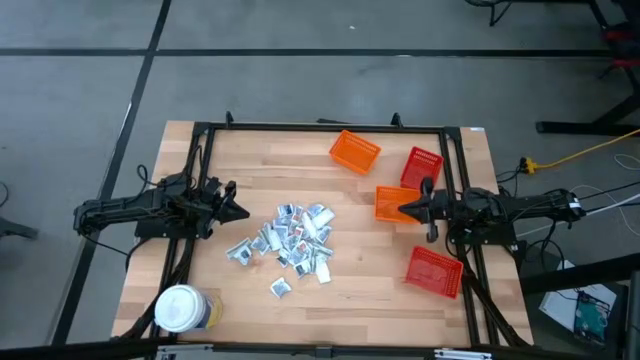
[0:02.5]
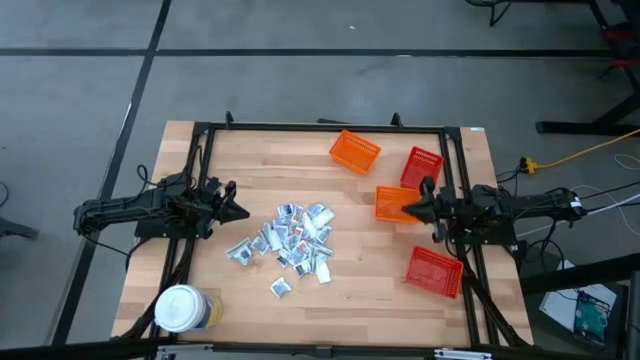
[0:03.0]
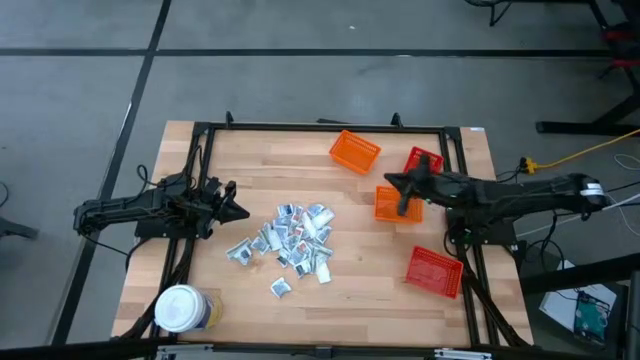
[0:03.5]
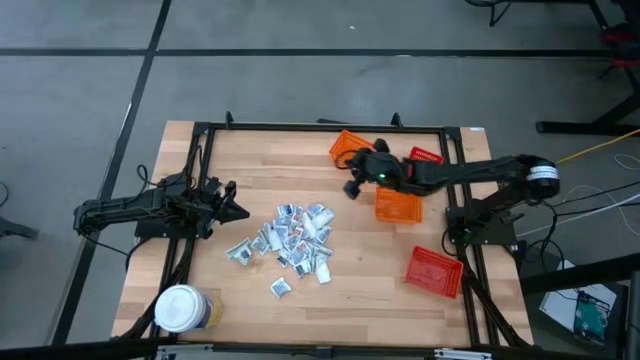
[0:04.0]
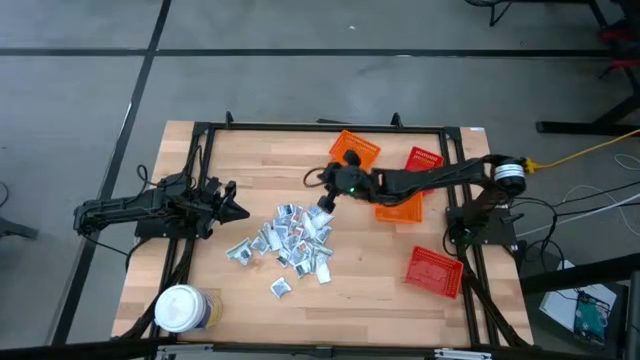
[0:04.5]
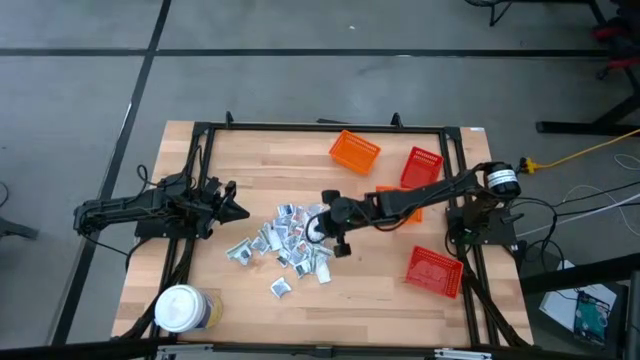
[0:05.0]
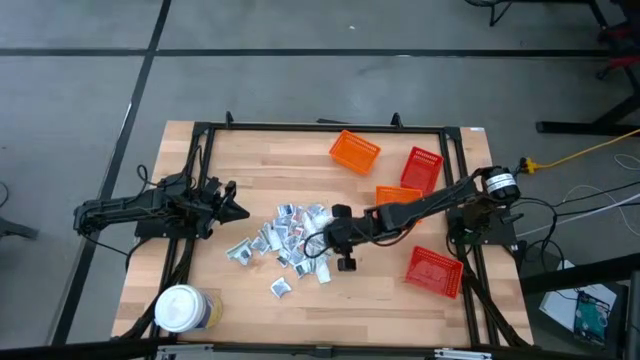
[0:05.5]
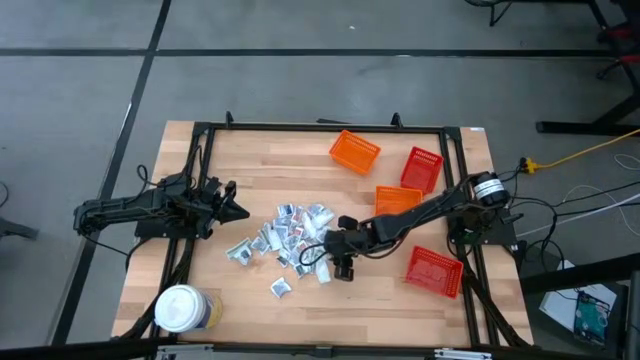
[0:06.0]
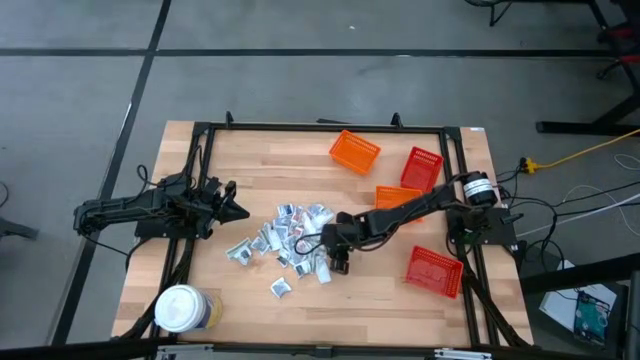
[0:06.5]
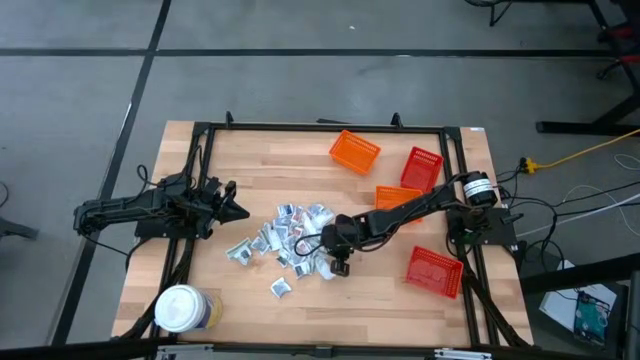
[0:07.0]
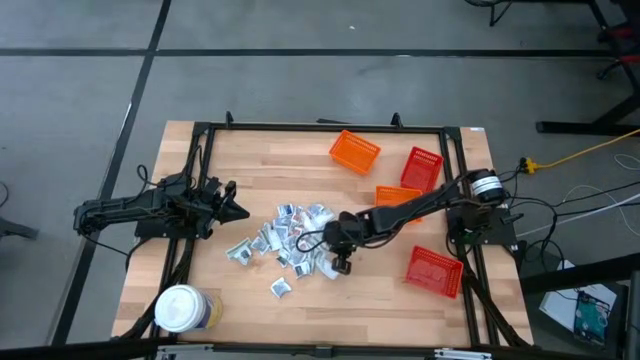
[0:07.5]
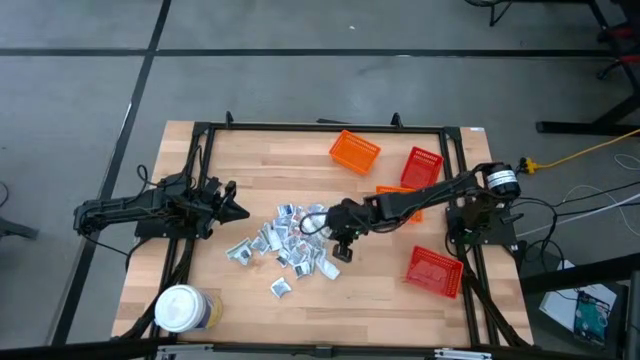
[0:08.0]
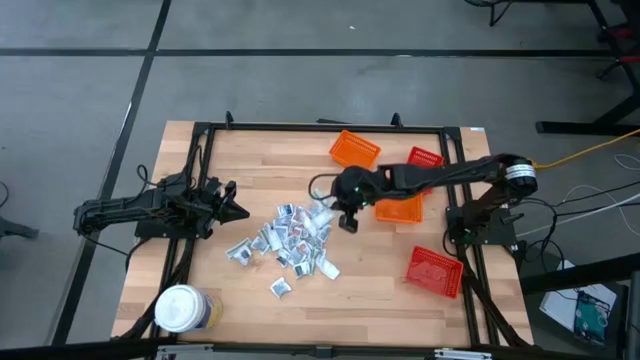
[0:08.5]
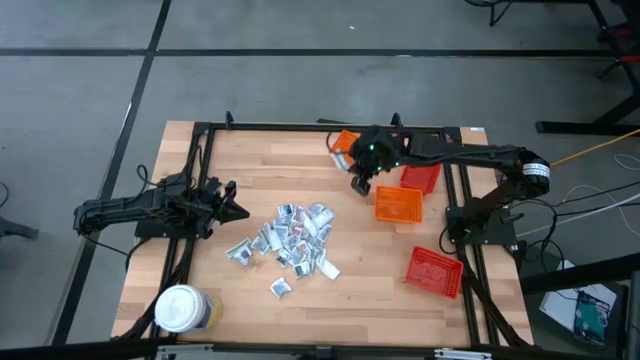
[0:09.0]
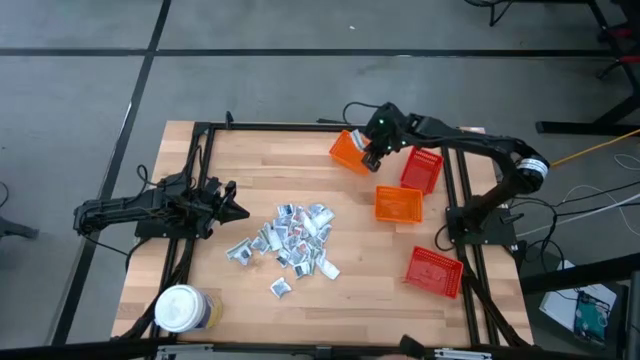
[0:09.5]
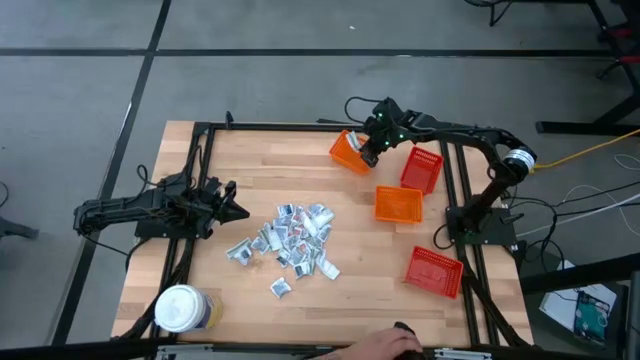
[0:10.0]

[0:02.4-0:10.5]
Task: Pick & Place First Aid Supplies
Put the green bandage pack into the top orange bin

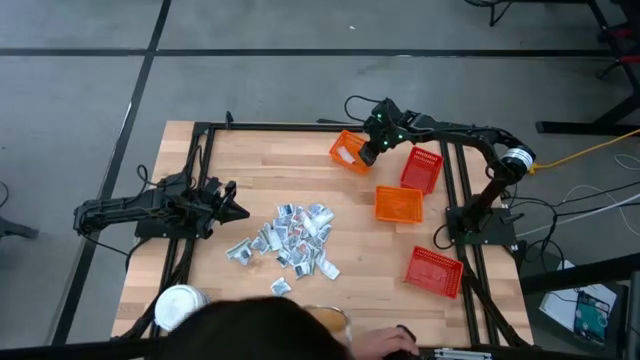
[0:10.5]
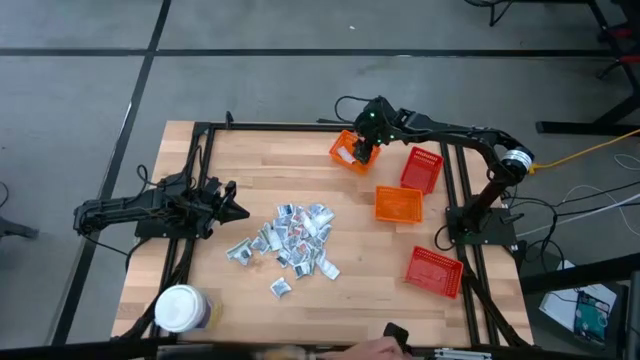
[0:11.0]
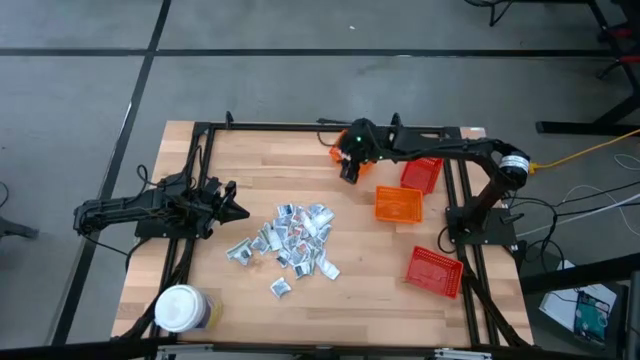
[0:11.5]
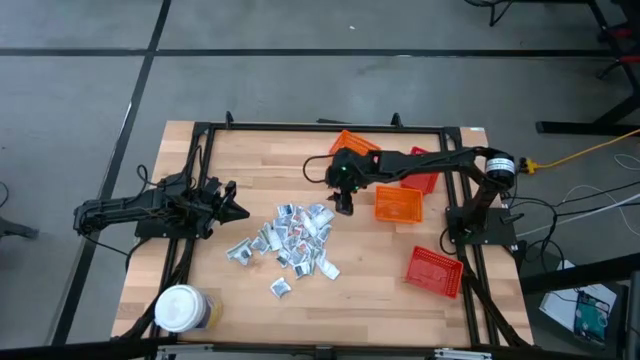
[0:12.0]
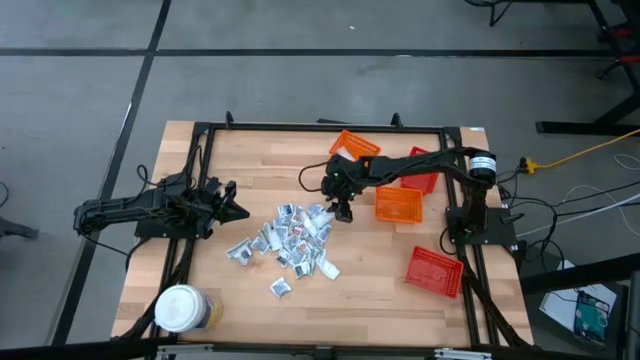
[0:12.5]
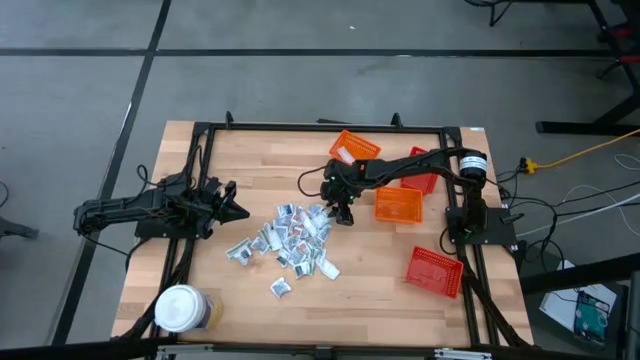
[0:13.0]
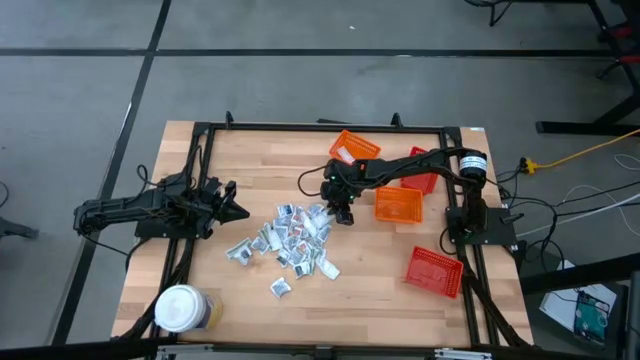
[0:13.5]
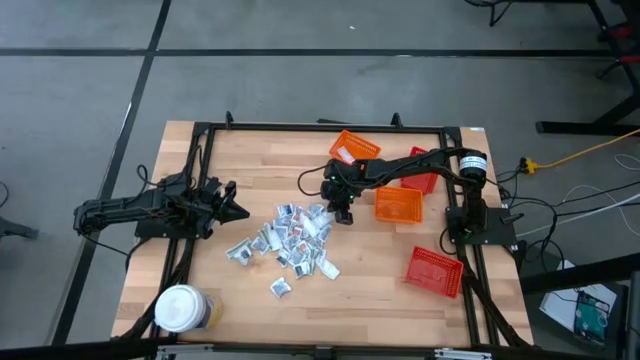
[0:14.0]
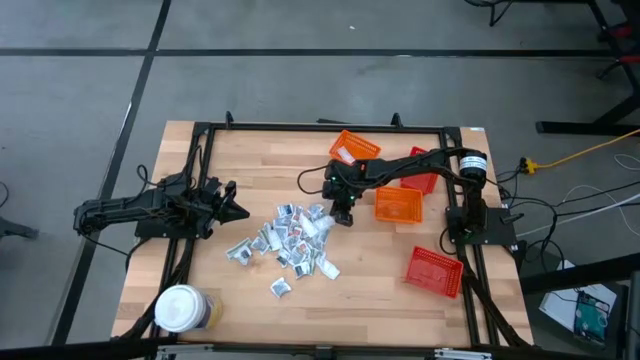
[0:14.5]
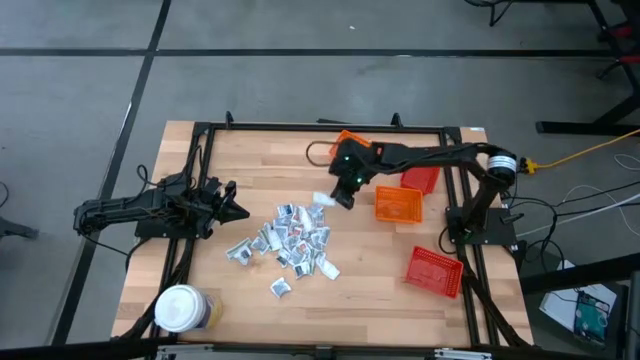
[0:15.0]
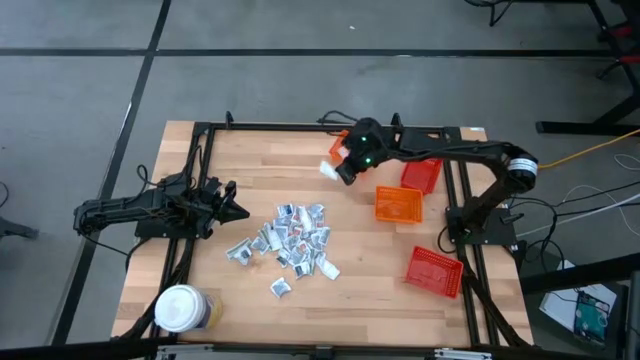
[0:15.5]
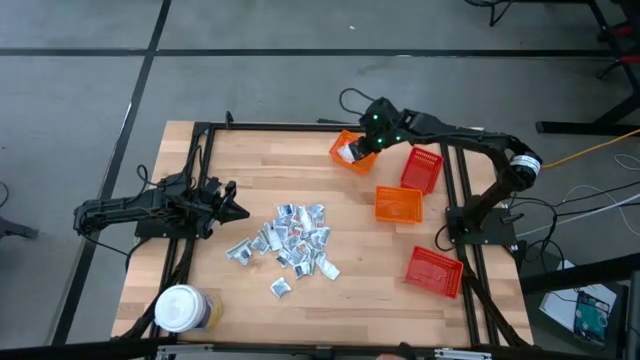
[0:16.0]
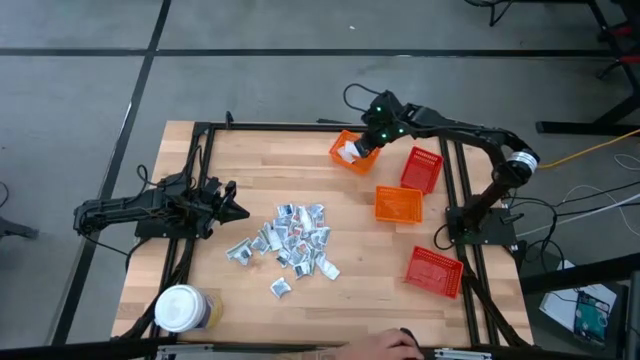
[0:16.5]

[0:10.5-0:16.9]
Put the green bandage pack into the top orange bin

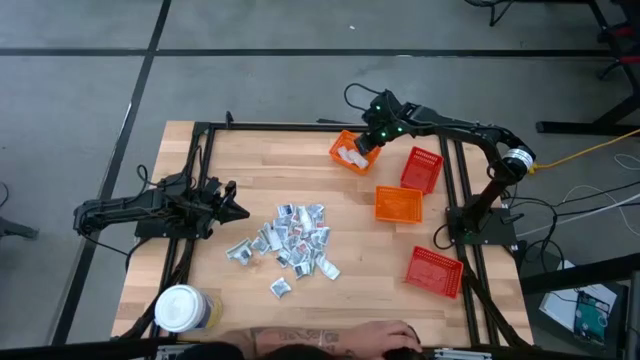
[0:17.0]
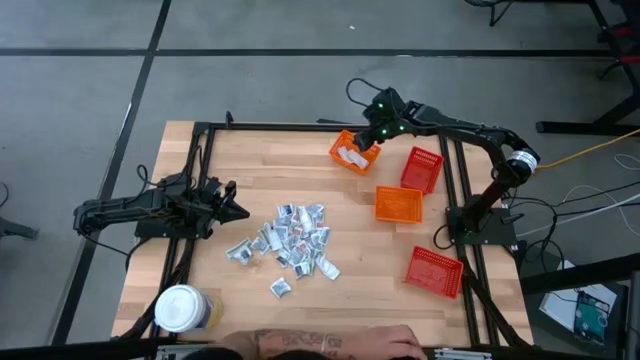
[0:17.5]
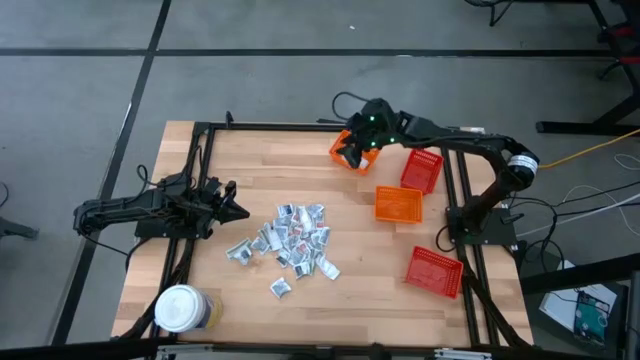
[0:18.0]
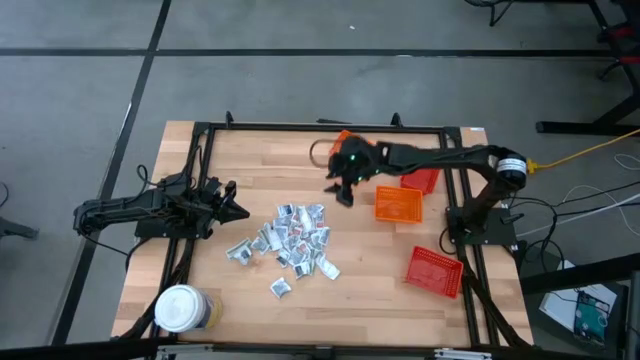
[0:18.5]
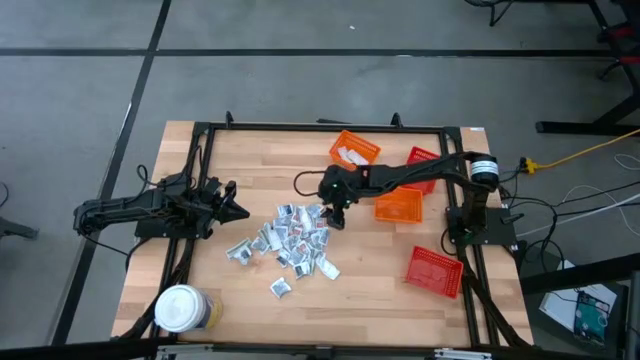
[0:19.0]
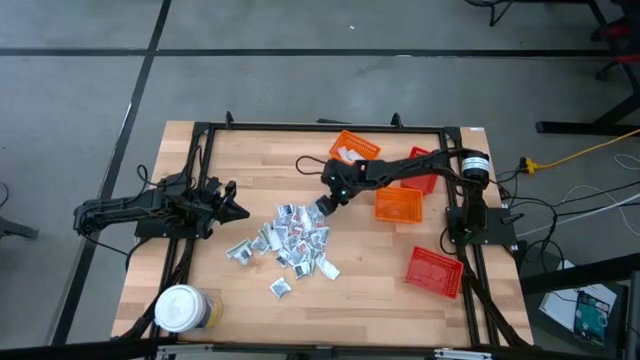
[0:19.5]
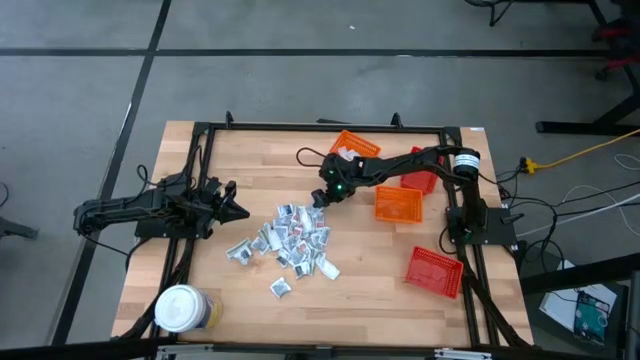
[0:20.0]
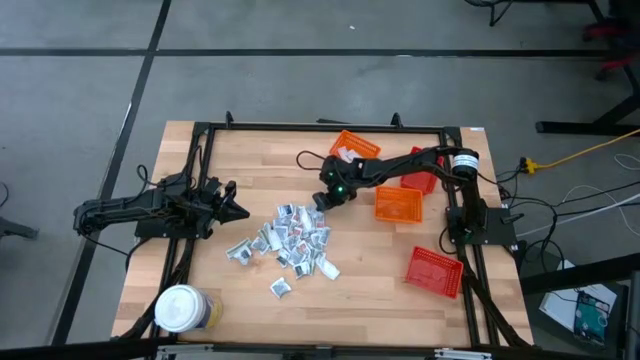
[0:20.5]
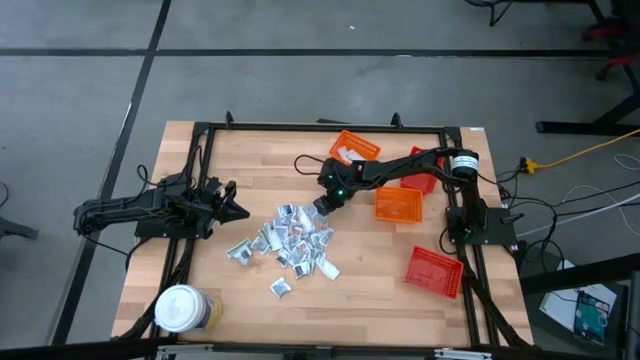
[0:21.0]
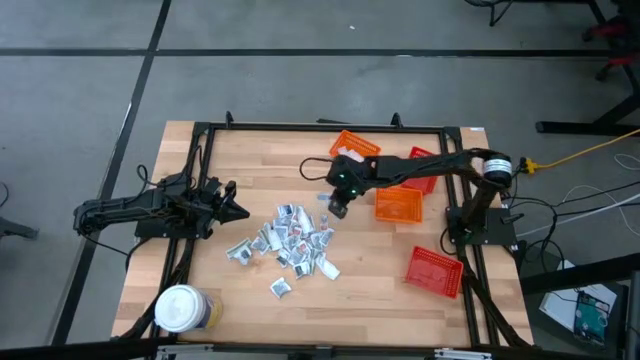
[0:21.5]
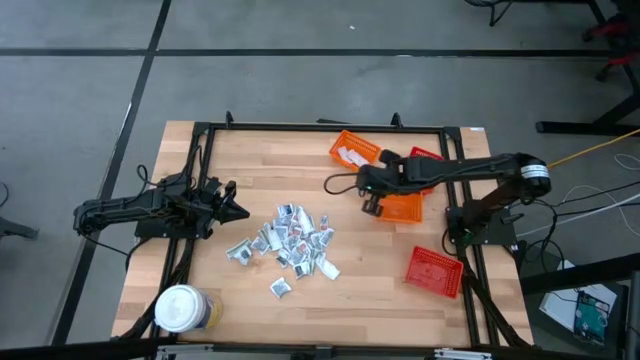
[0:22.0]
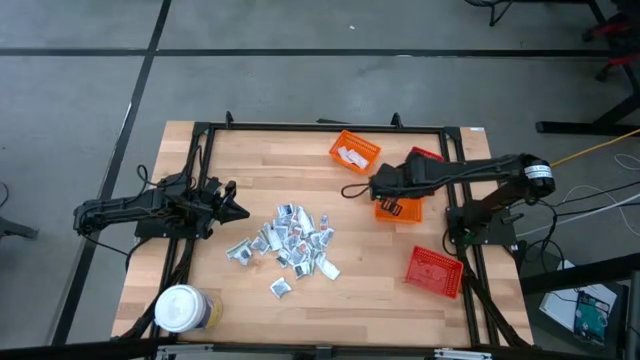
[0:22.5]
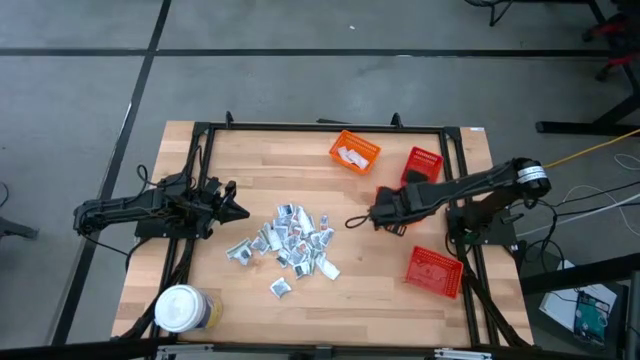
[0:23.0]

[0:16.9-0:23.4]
Put the blue alcohol pad into the bottom orange bin
